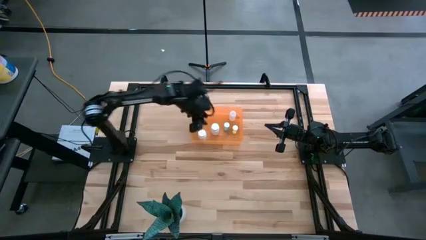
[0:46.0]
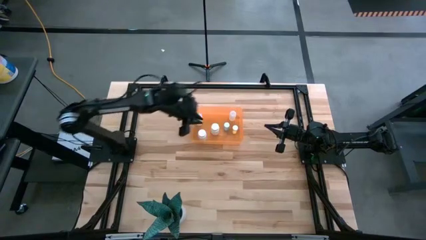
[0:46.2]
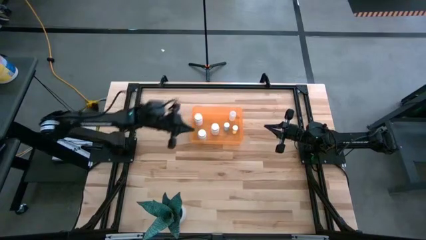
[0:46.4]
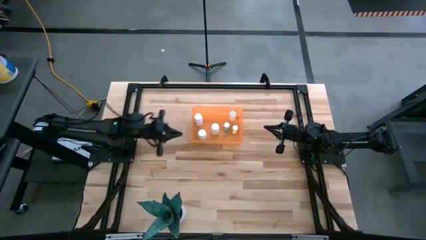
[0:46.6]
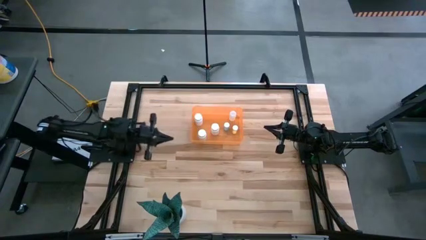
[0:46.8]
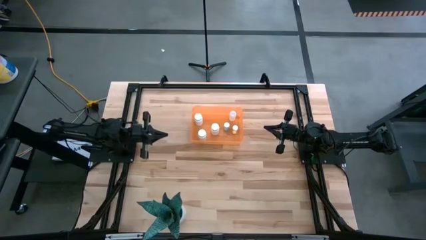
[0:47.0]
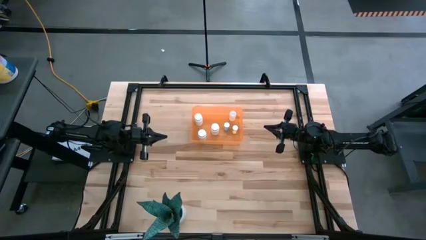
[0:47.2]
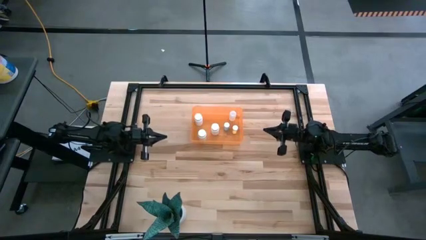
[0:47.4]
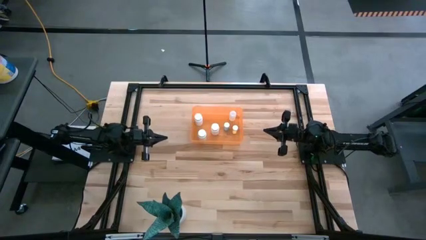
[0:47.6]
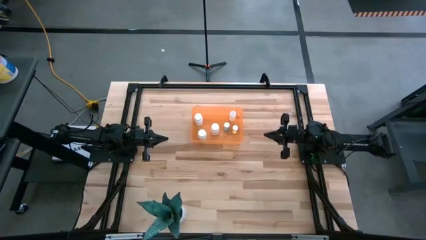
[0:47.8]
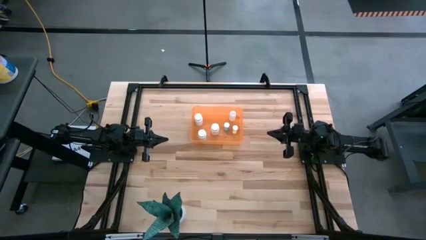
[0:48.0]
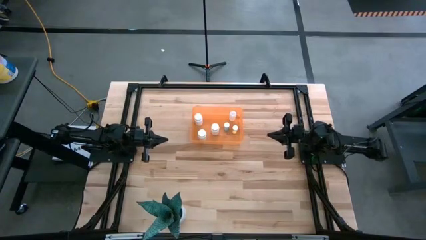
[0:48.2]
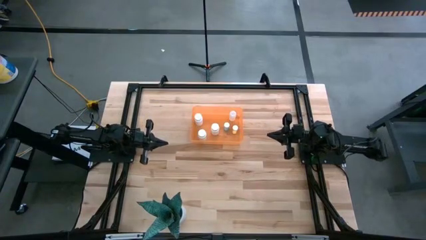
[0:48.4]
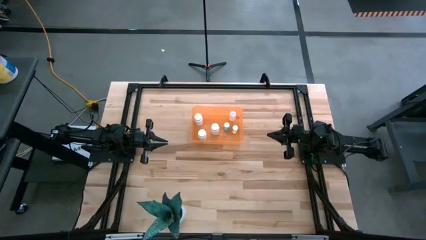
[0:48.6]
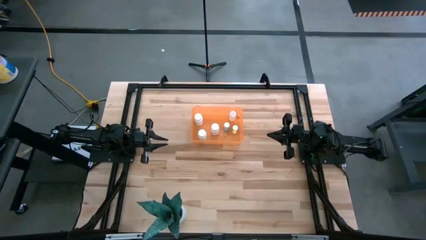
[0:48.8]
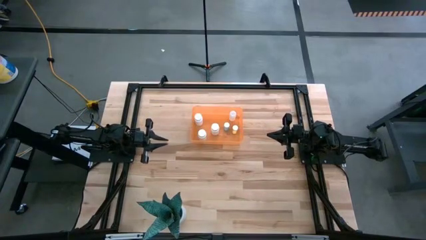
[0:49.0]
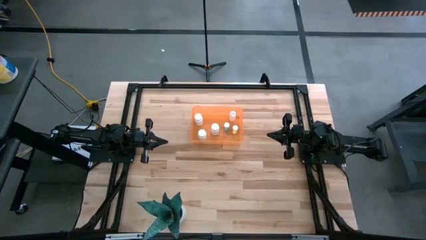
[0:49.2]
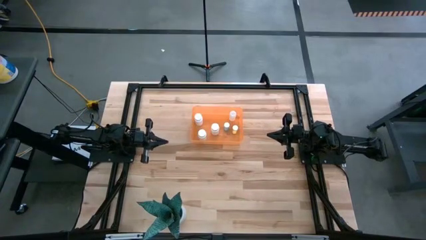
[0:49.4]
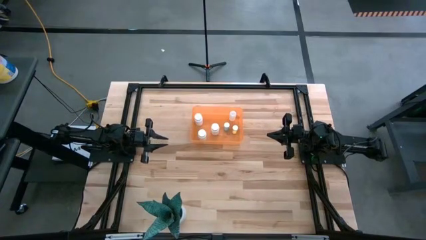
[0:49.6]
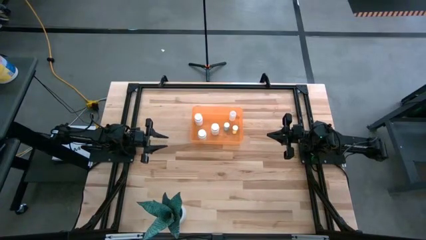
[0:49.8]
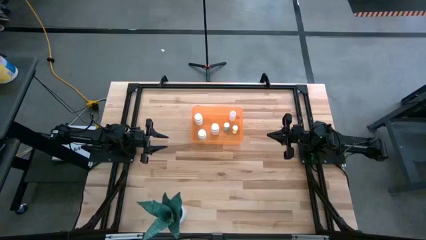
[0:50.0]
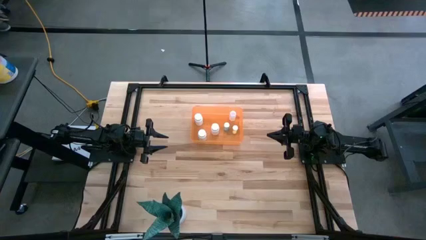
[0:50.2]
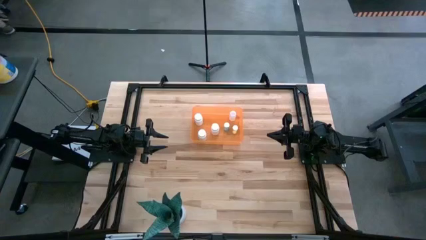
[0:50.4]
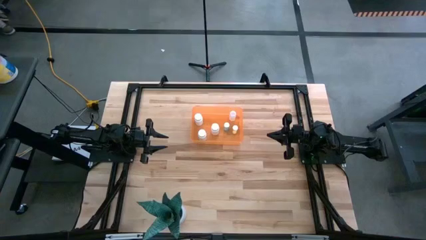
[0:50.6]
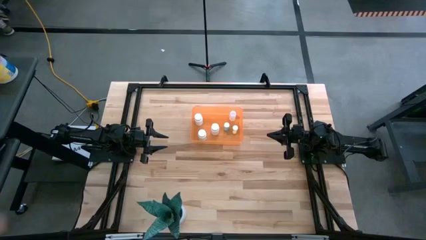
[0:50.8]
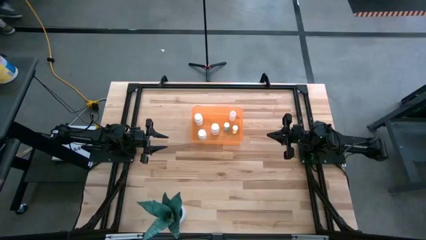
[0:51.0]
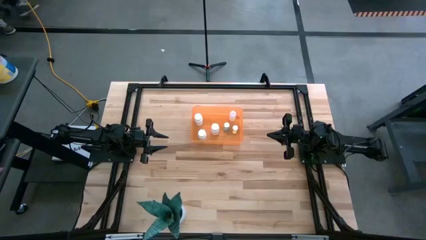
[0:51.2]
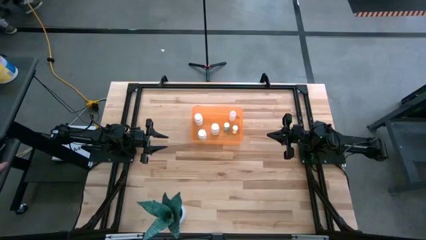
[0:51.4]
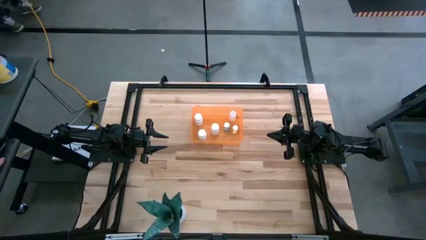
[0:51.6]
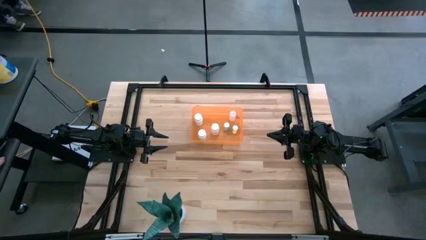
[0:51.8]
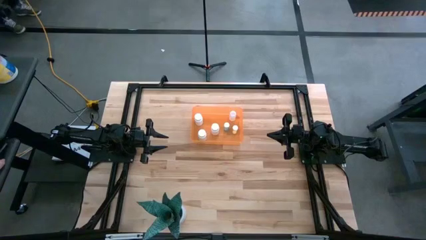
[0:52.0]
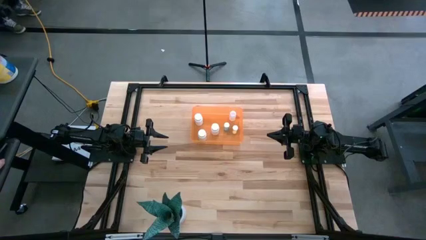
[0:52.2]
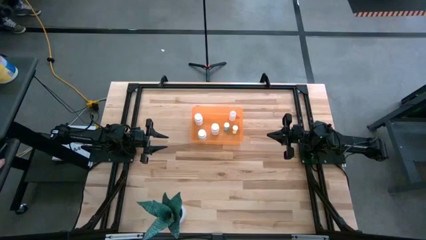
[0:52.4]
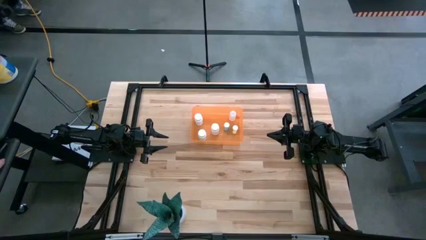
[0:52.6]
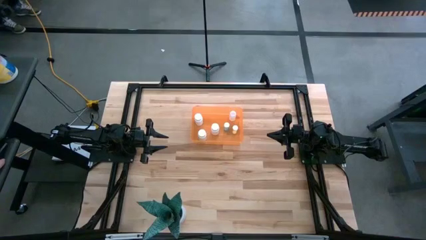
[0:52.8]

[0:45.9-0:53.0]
Task: Pick and place pill bottles into a basket
Return to Home Position

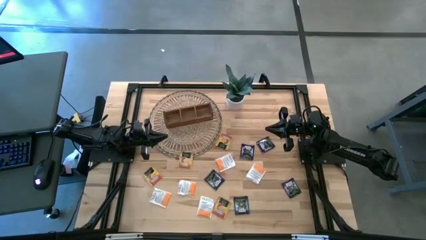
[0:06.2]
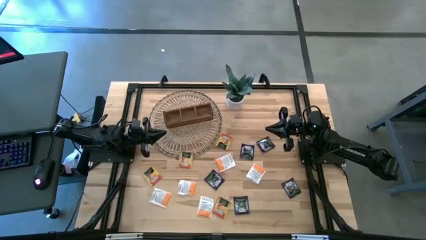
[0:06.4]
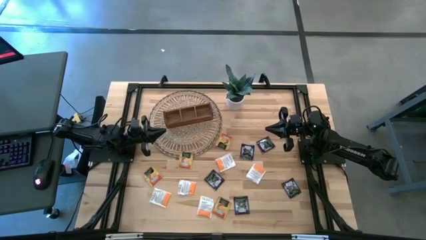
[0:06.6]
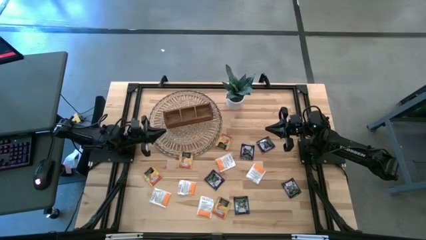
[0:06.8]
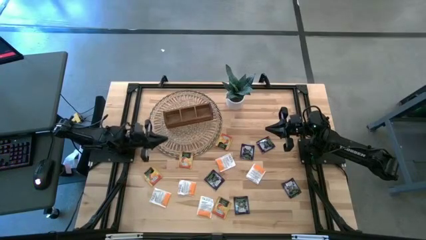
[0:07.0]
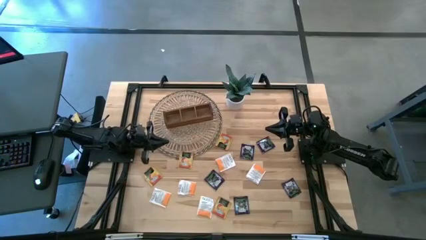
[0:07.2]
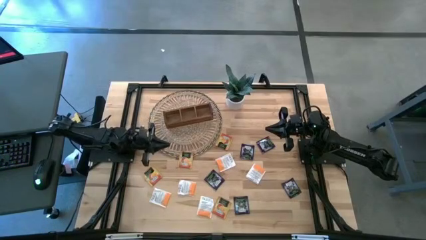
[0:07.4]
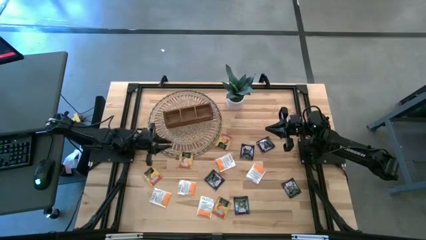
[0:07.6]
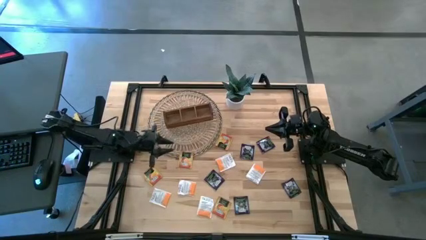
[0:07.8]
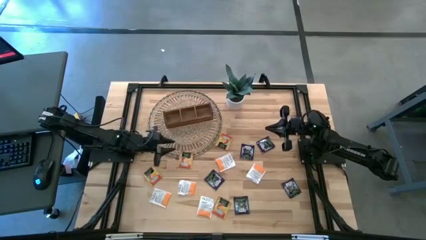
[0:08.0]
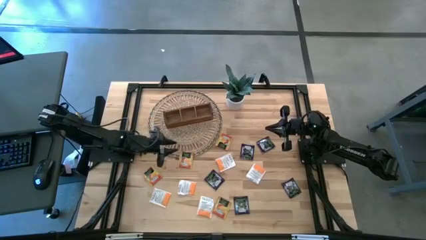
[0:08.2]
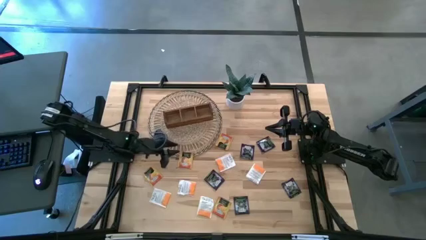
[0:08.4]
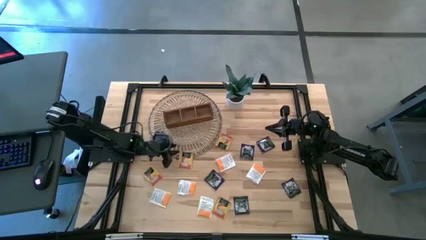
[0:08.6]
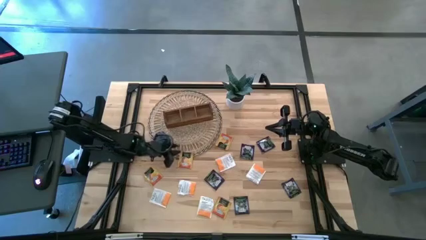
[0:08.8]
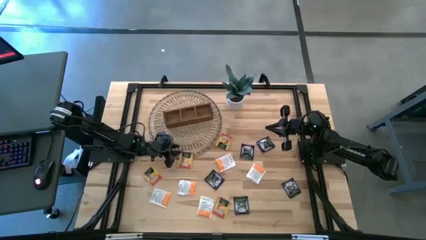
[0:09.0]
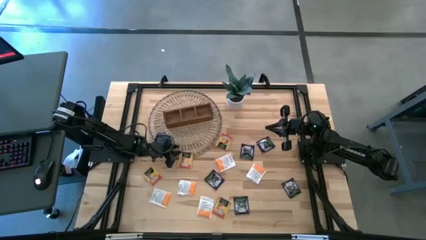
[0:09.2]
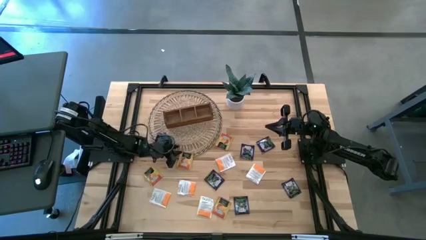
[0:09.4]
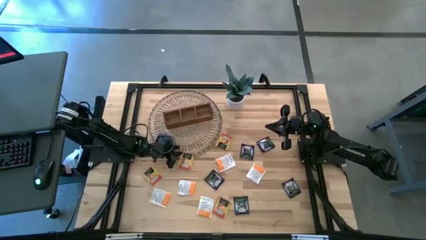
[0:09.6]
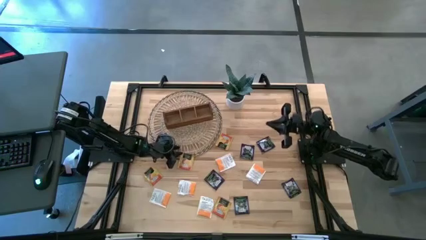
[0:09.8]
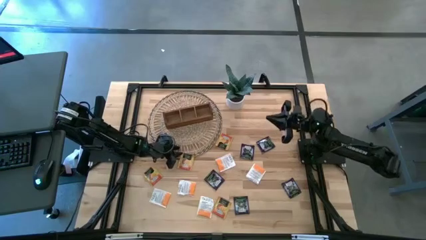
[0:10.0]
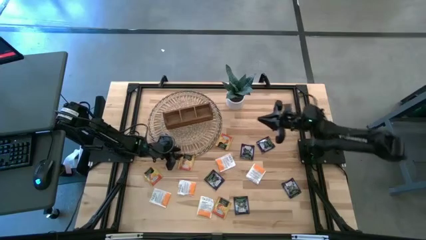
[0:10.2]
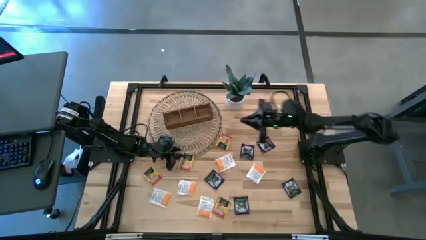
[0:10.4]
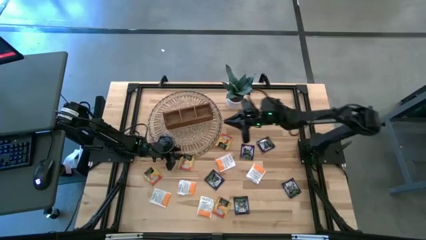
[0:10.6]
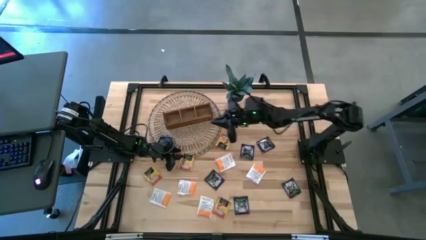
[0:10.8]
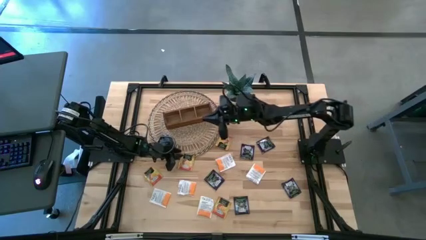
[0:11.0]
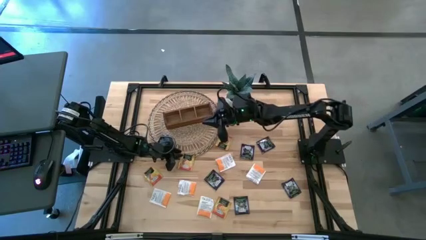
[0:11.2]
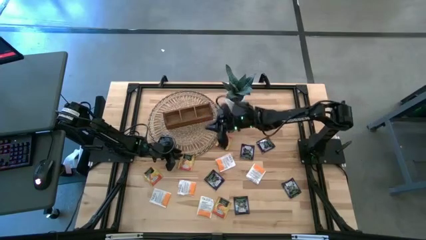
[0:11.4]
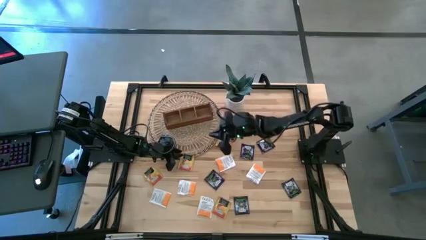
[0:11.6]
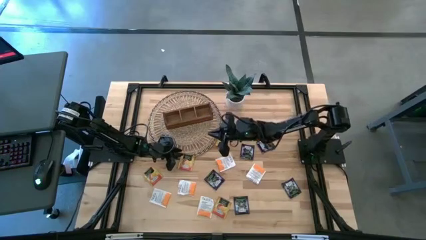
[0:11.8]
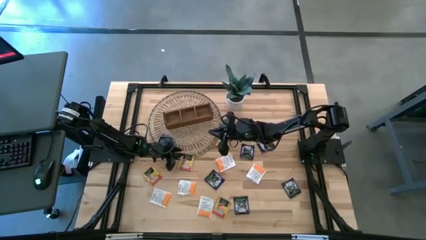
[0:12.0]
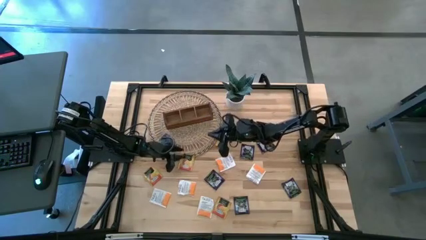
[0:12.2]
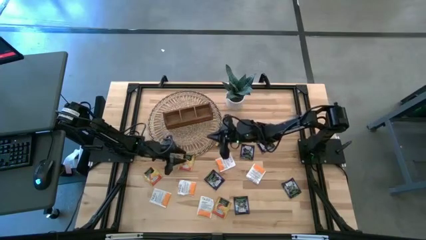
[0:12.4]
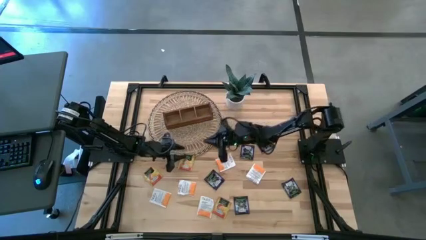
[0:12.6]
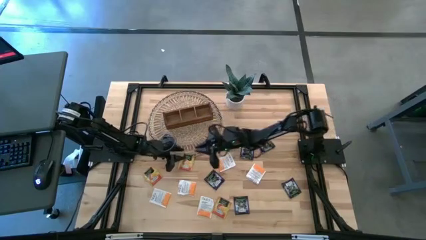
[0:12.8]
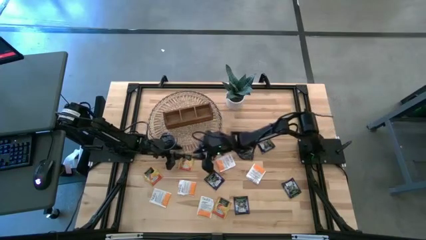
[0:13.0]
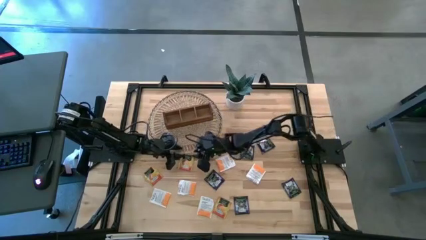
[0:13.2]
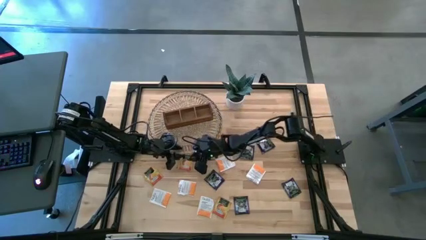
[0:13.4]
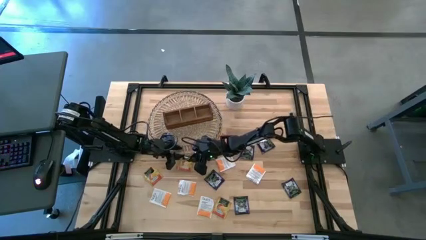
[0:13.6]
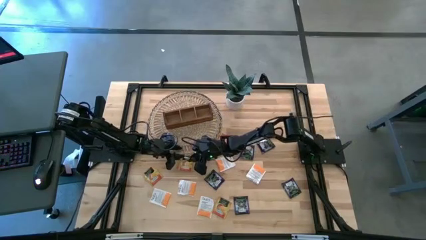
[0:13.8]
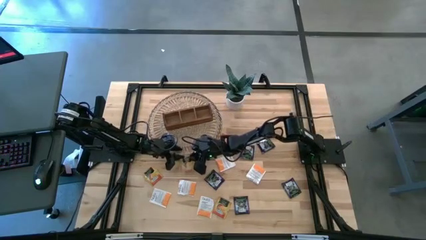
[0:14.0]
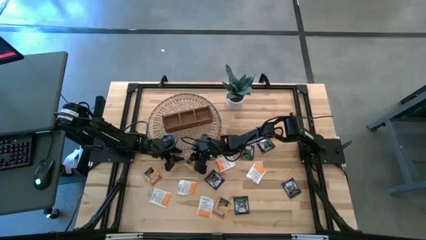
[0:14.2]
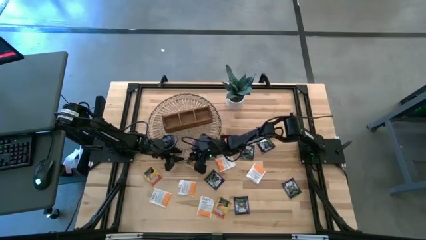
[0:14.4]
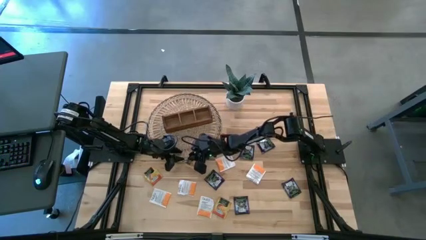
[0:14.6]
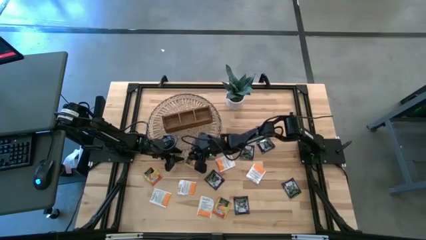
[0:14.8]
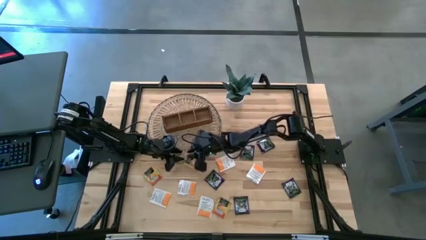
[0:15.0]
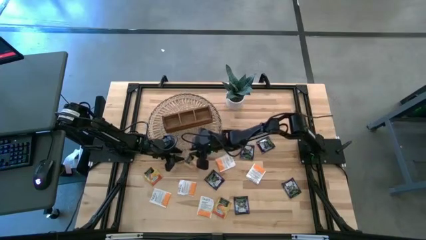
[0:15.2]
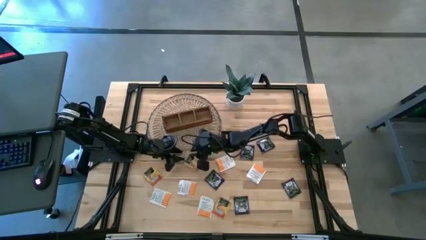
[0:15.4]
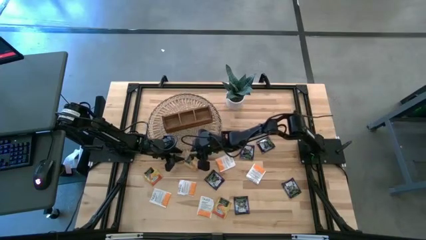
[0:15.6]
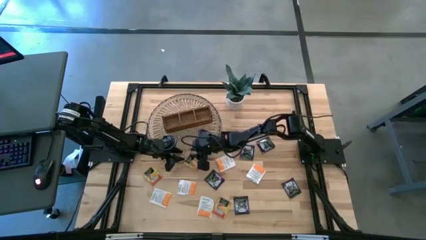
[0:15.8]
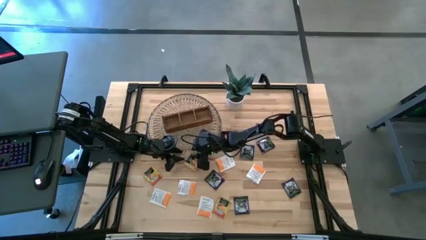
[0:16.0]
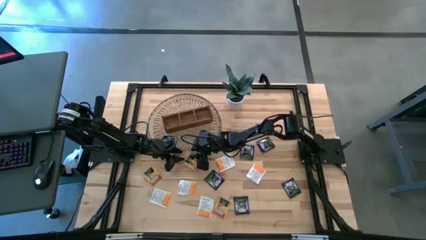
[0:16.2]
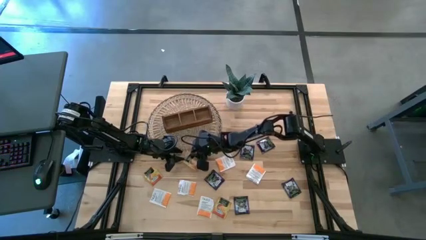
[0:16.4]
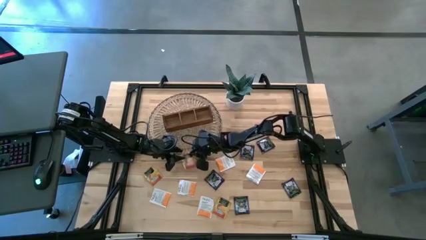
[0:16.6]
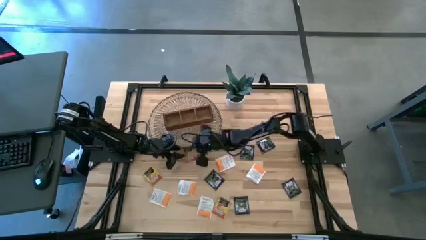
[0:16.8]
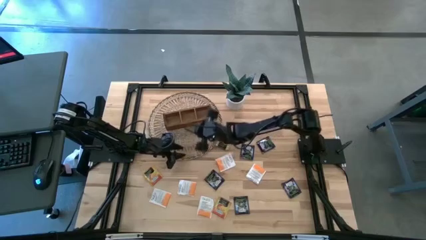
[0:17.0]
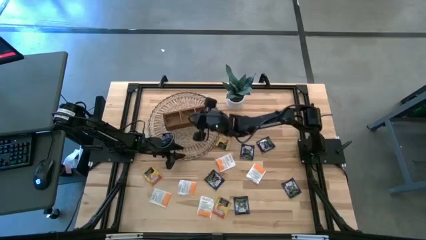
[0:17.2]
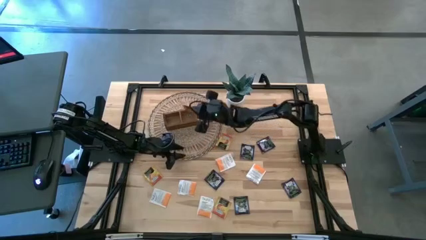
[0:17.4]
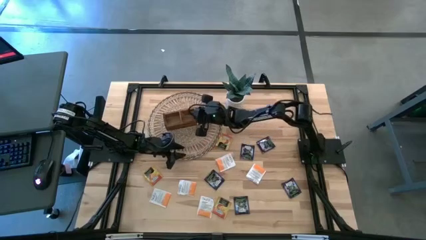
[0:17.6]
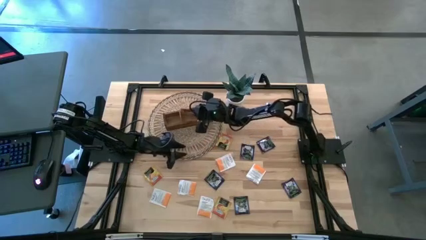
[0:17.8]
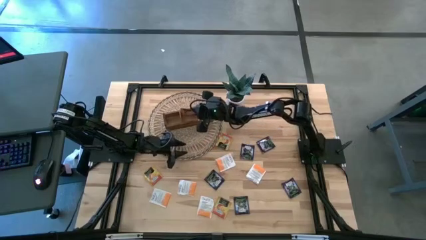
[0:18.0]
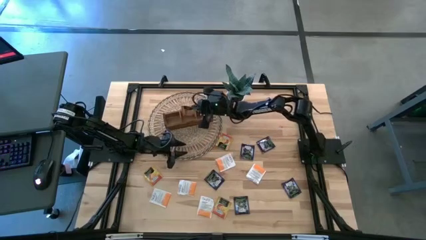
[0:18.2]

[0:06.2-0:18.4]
Task: Pick & Place Tea
Put the yellow tea bag into the middle section of the wooden organizer
